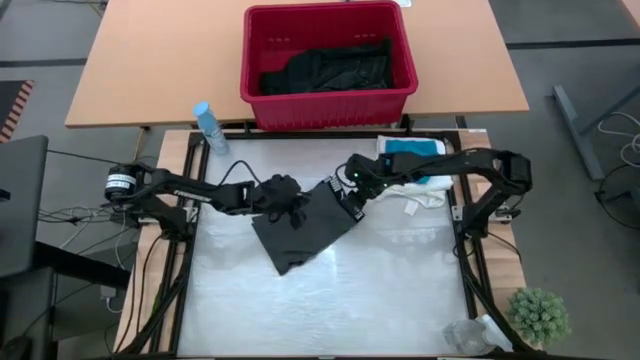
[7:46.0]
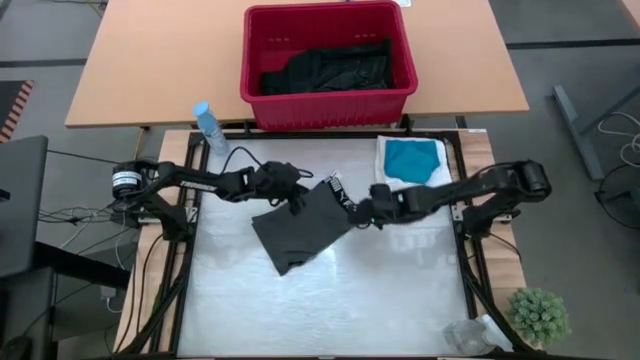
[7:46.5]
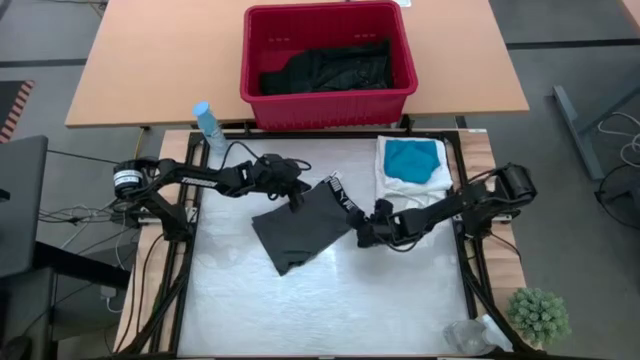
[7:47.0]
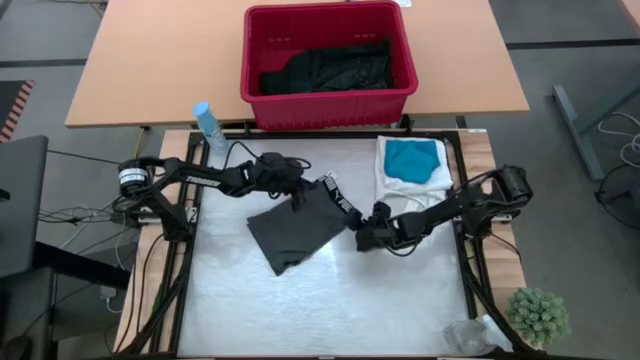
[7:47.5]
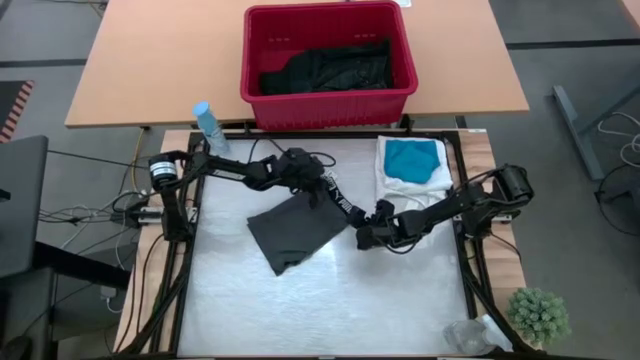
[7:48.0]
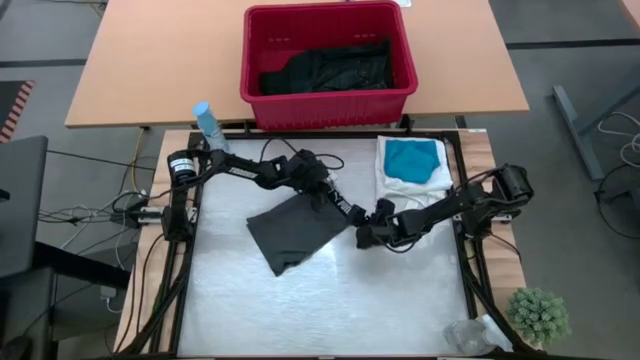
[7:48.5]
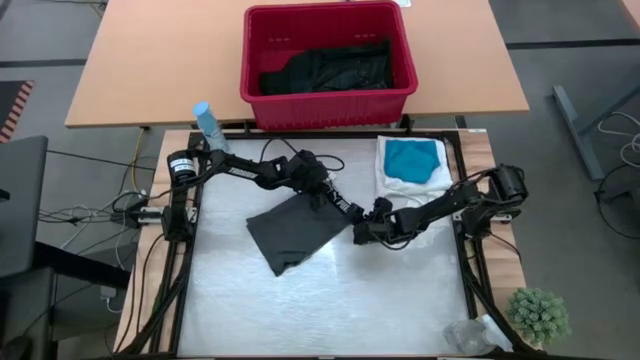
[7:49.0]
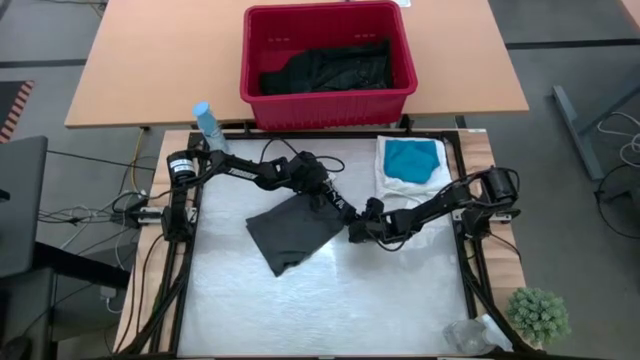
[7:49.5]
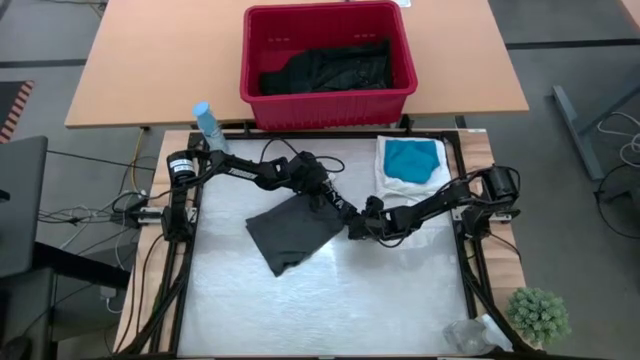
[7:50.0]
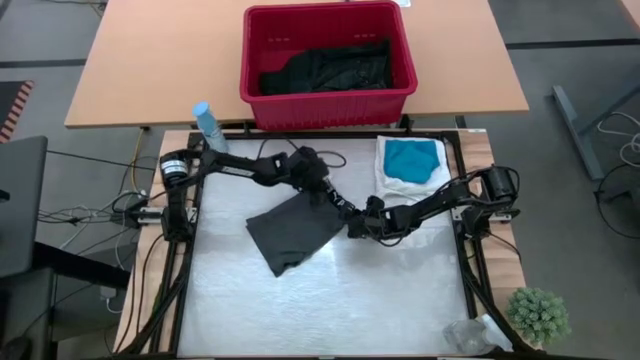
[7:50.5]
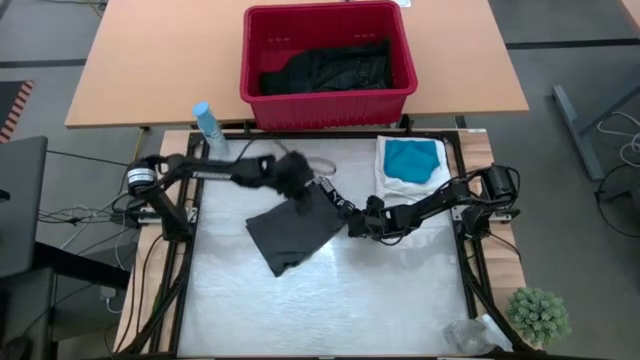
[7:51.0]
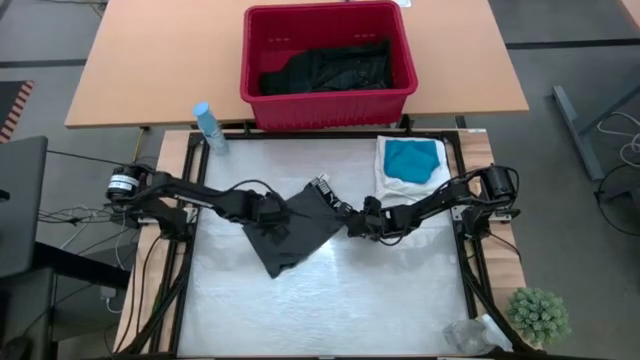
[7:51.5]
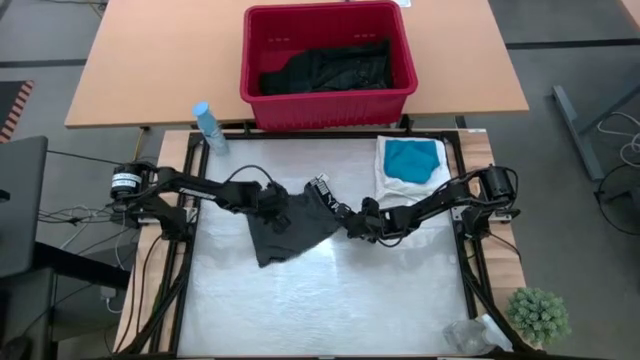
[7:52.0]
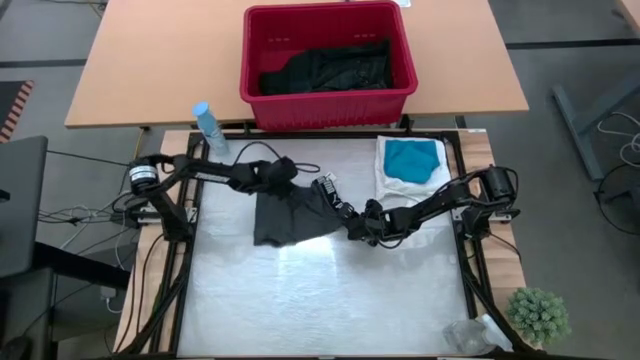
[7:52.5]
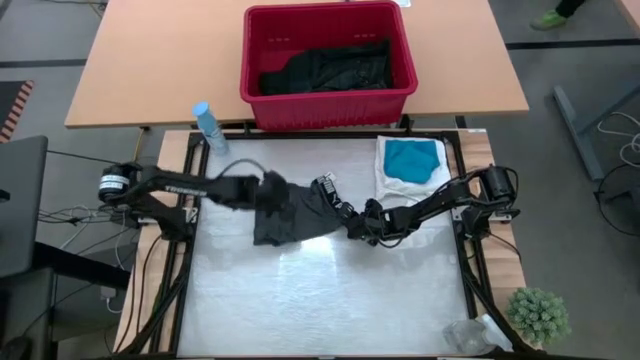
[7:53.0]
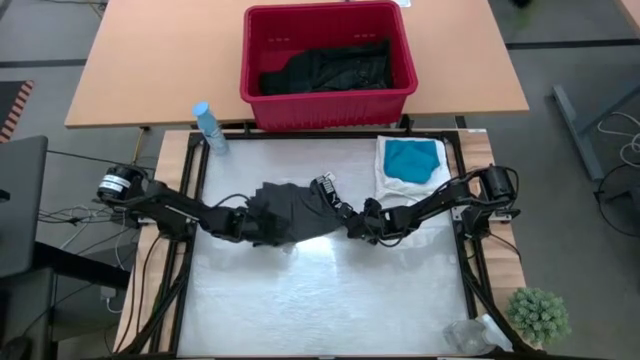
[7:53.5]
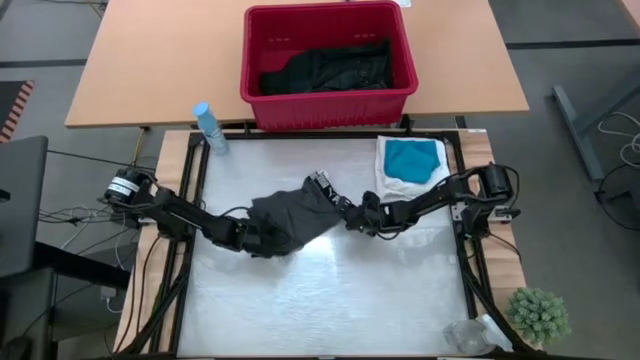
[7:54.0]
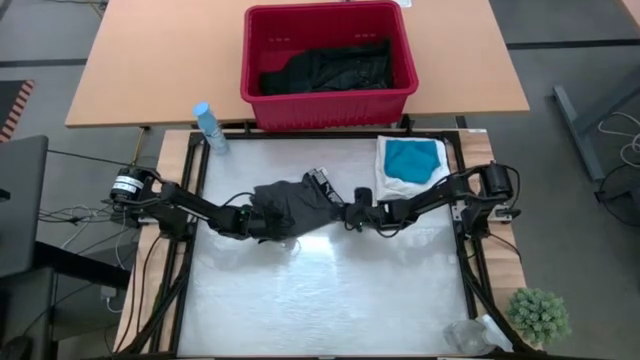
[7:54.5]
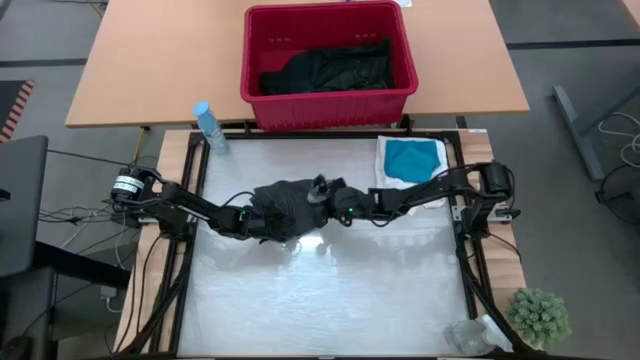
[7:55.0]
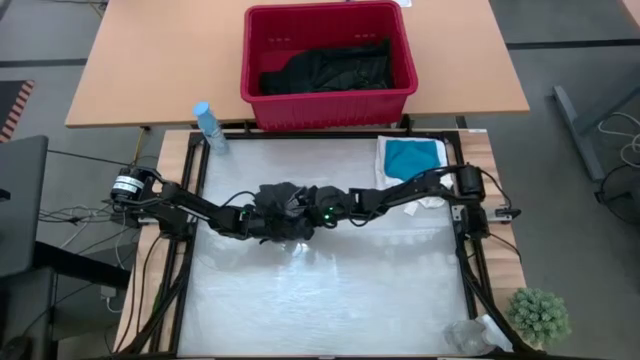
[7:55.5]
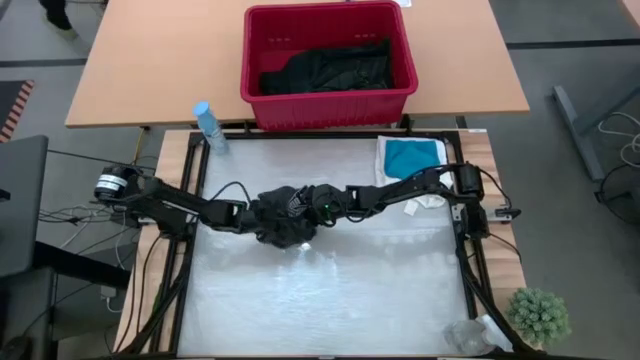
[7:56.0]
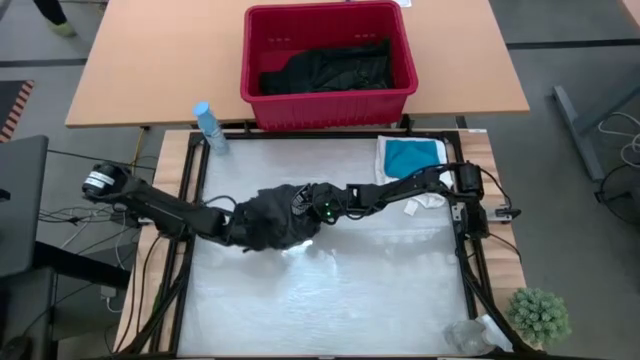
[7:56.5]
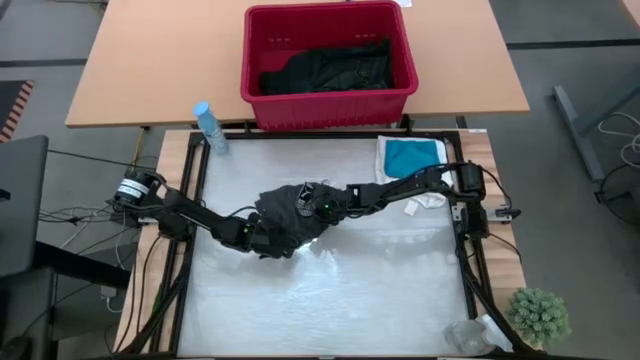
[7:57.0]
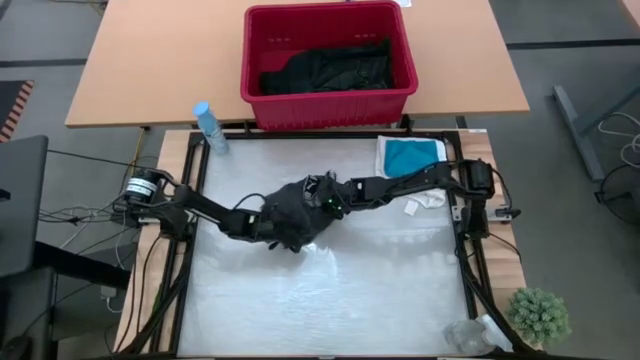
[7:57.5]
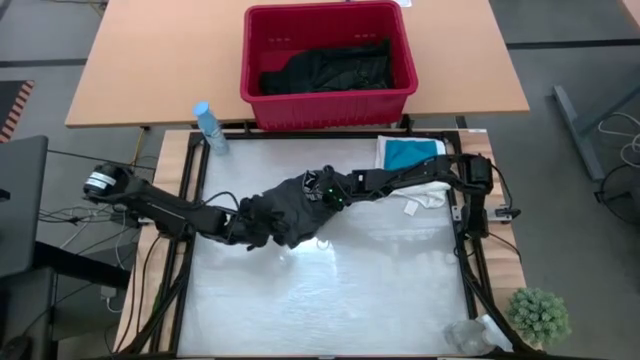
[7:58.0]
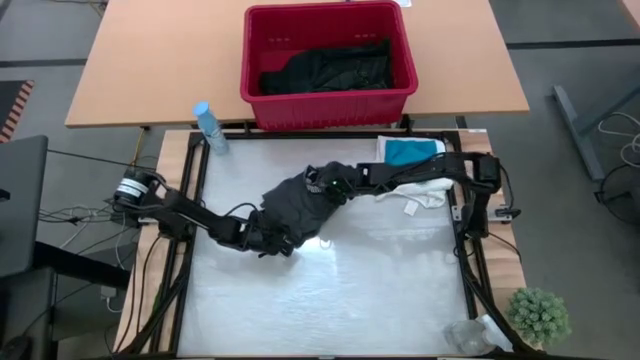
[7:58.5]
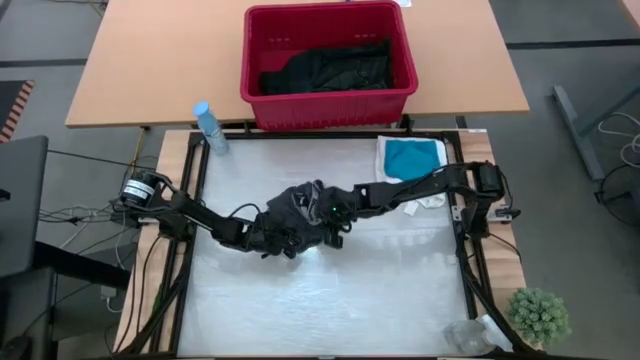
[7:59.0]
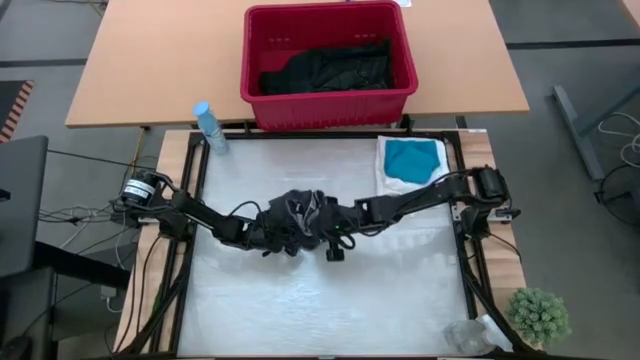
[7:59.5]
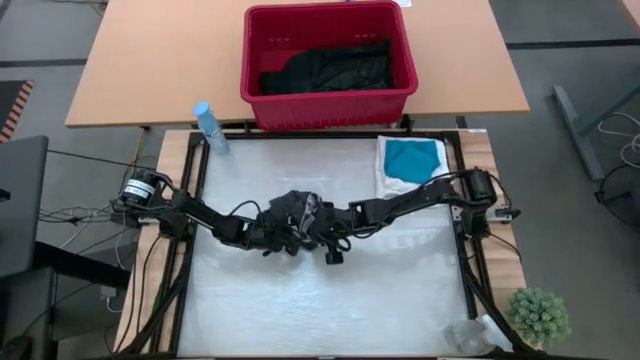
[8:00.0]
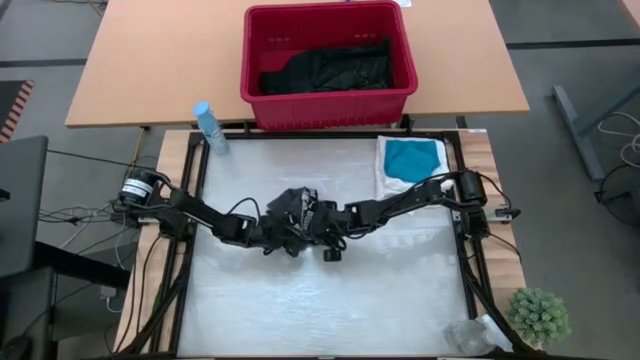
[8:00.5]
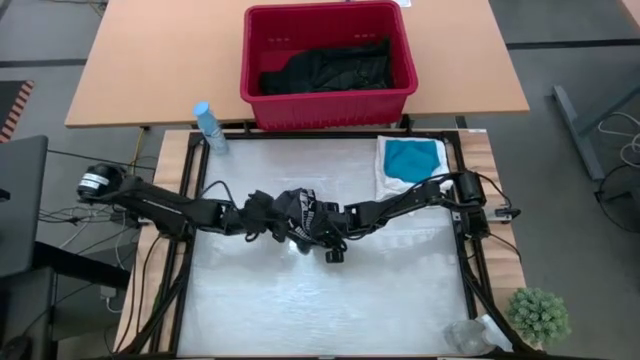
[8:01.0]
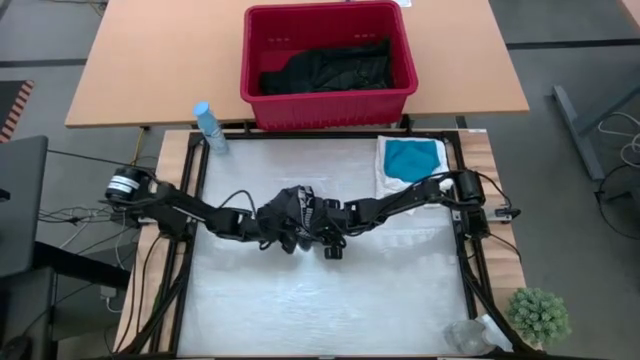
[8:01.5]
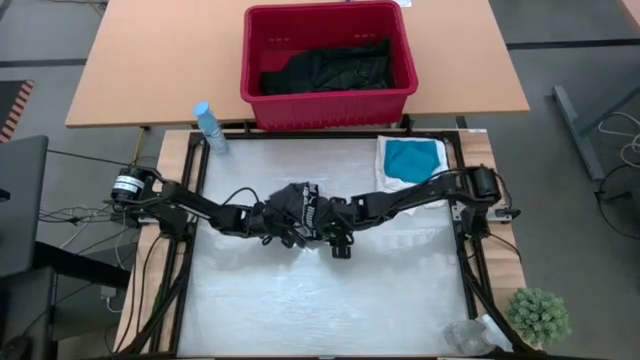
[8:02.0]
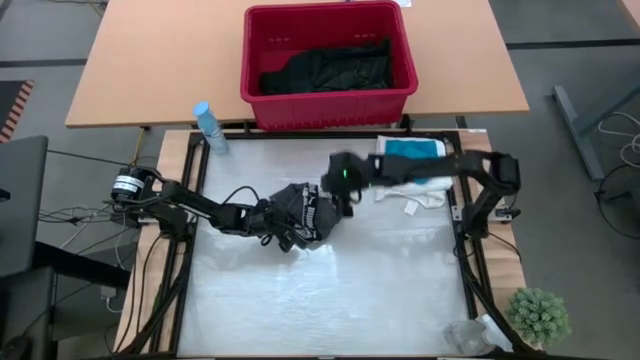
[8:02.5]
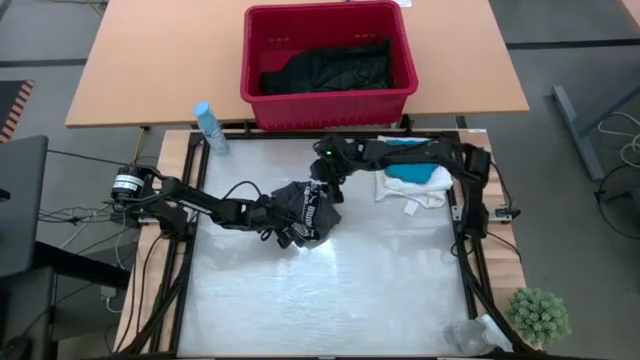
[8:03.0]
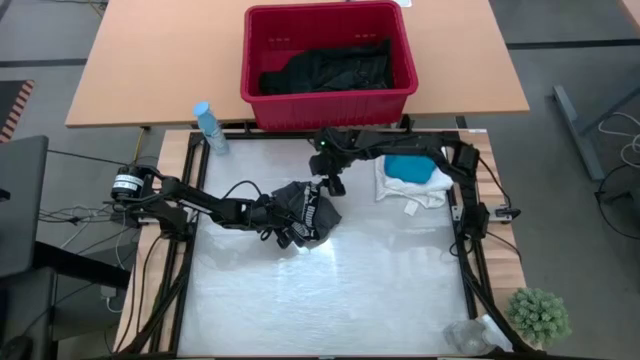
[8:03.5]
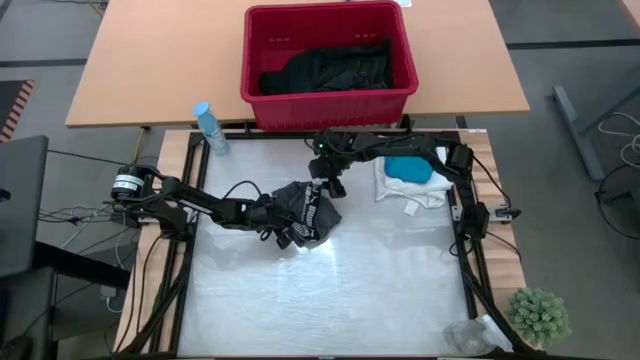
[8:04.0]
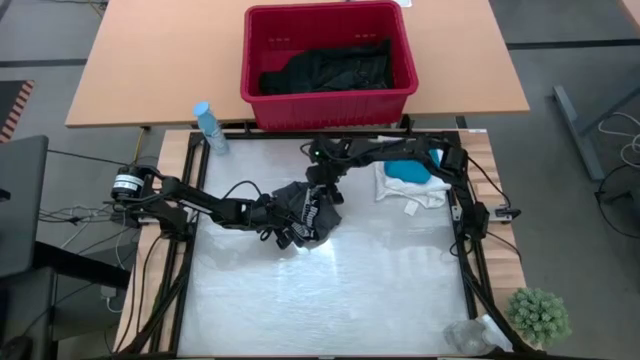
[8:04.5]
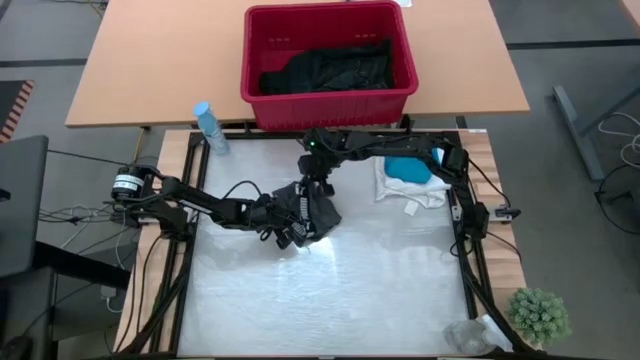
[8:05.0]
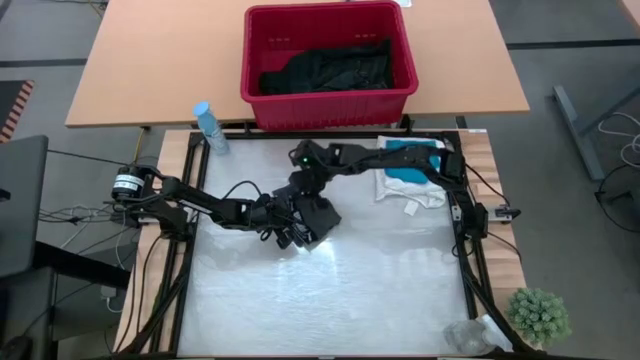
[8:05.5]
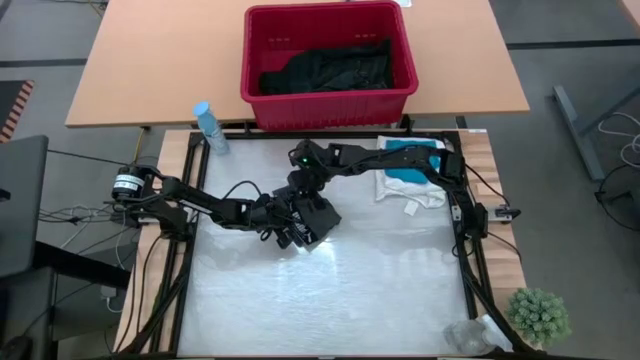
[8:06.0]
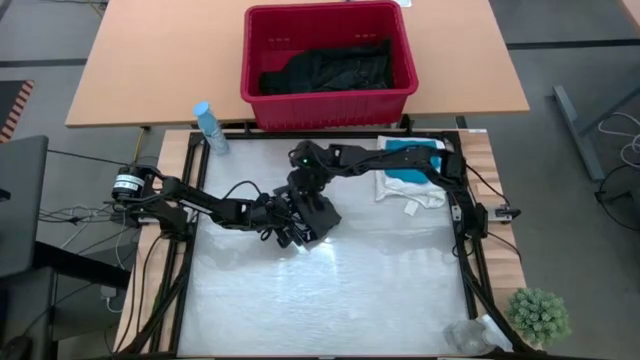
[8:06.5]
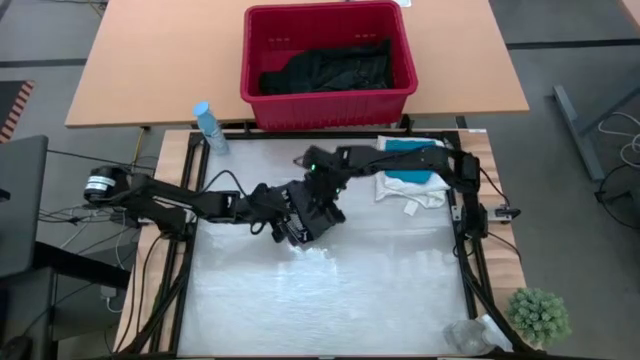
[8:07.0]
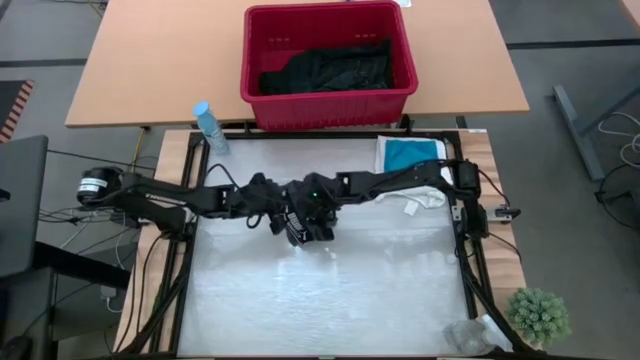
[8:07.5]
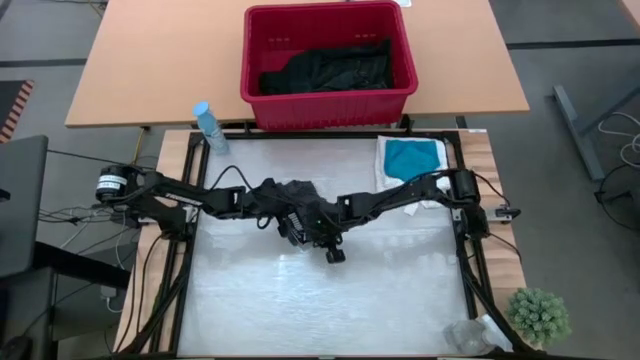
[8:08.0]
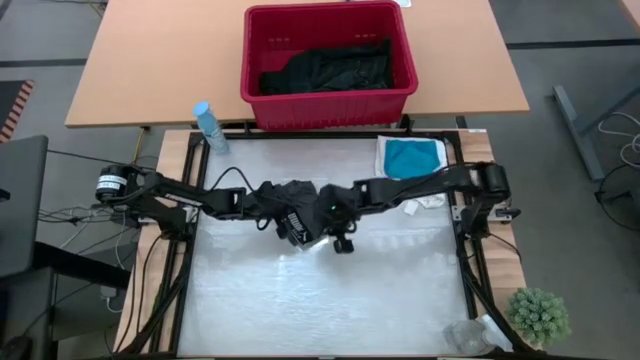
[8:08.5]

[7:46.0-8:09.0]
Task: Fold laundry
Fold the gray boxers
